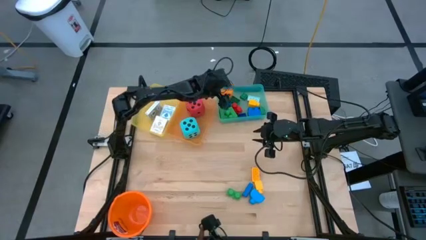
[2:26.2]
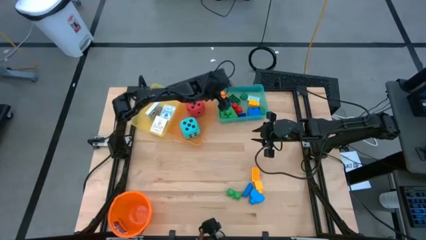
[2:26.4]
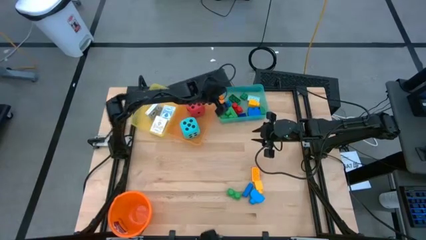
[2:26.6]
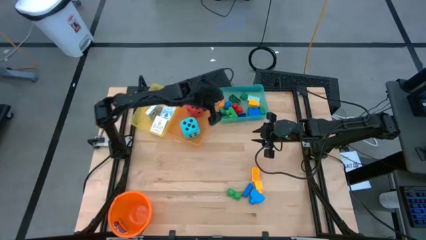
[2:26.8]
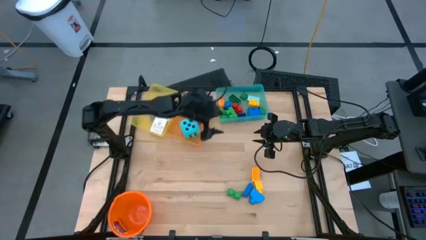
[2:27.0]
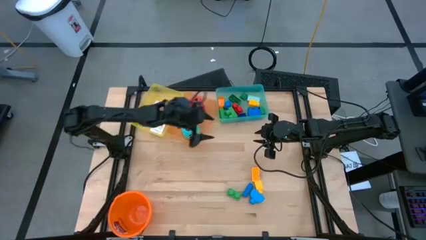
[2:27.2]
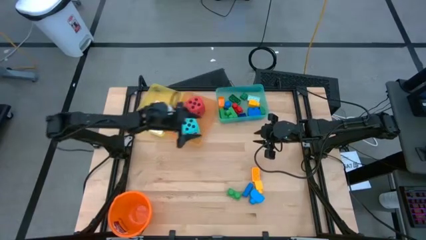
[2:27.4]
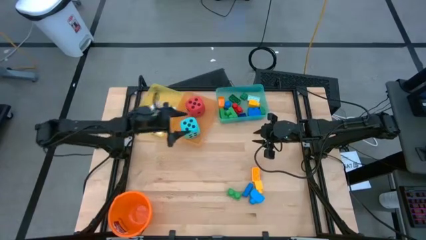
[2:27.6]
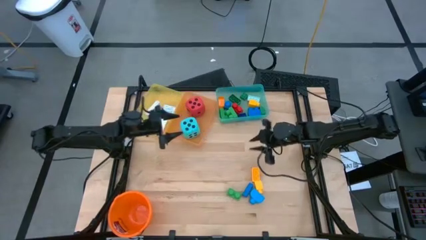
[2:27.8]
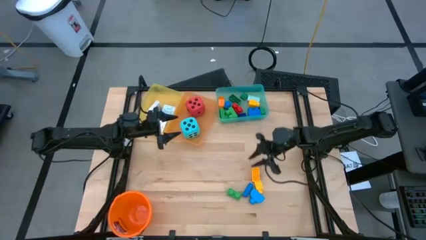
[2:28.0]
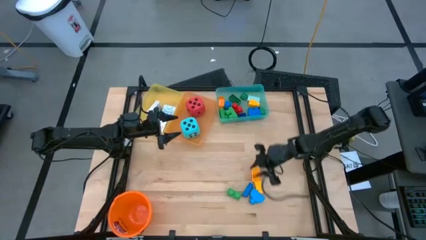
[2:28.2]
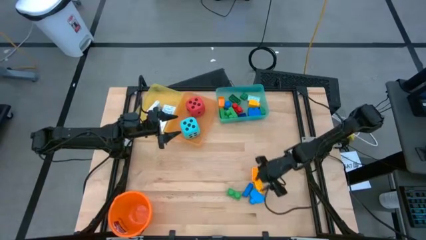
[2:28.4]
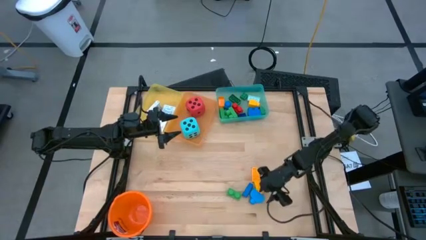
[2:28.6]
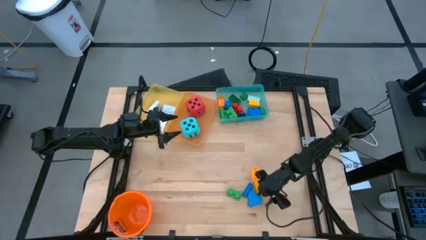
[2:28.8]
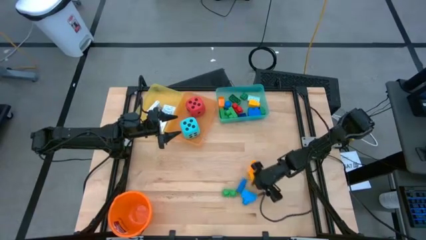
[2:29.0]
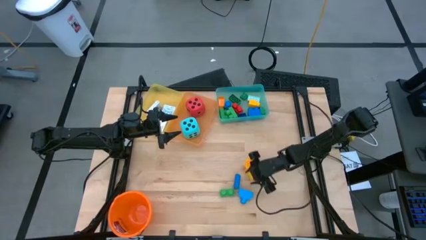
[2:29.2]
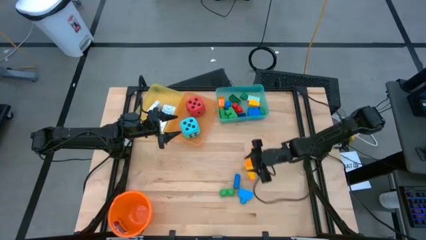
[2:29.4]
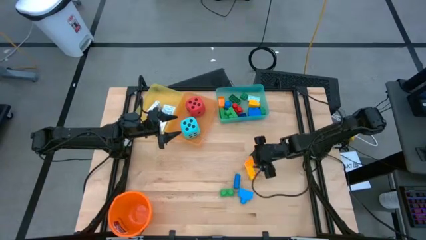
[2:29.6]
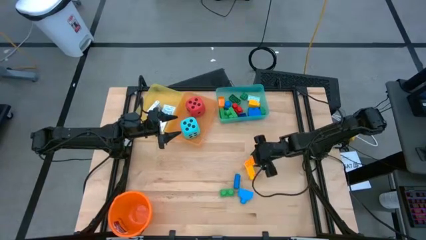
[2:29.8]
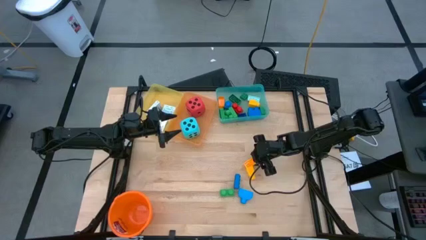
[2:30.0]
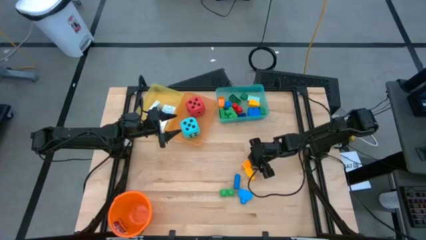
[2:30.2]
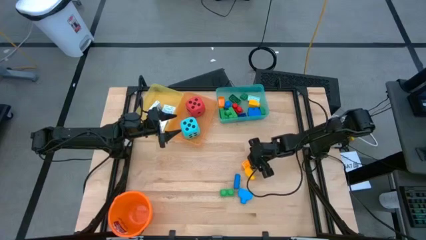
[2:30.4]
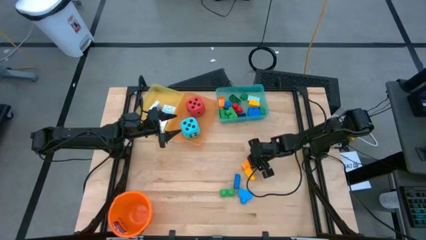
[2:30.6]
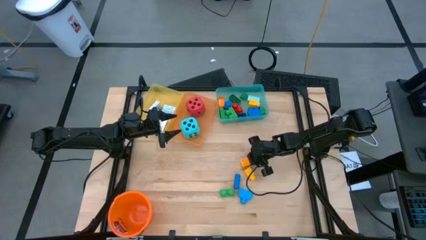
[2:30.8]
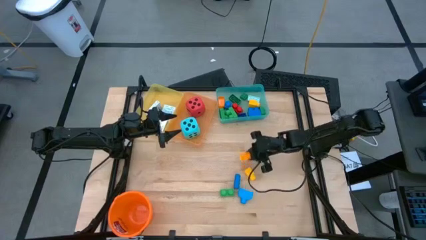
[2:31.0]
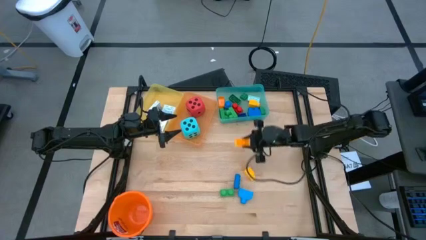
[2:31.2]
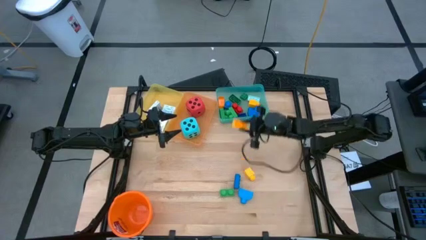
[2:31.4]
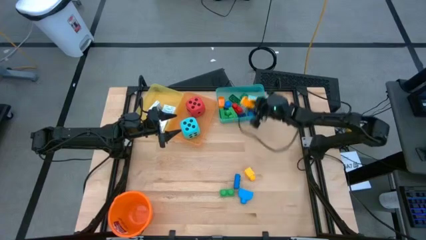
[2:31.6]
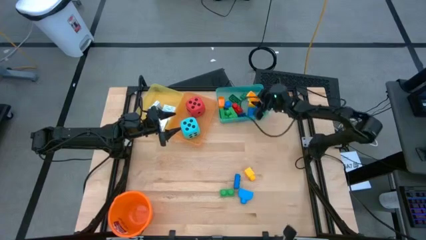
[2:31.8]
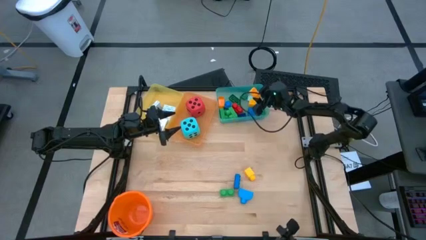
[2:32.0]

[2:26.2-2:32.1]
Task: Pick & Place Toys
Put the yellow game piece into the blue bin

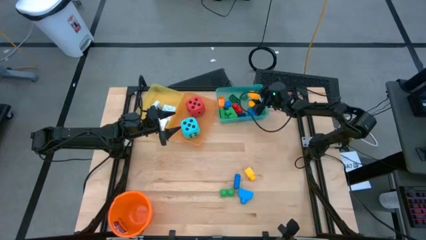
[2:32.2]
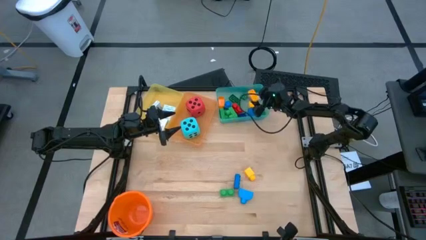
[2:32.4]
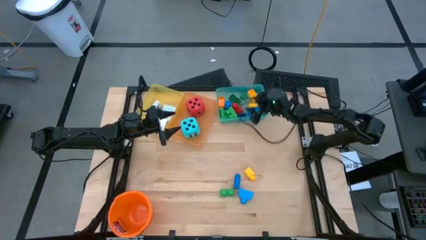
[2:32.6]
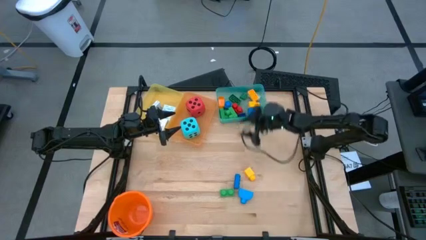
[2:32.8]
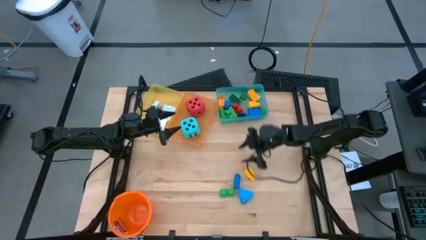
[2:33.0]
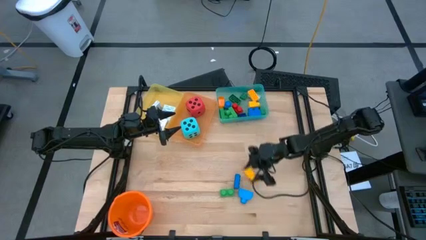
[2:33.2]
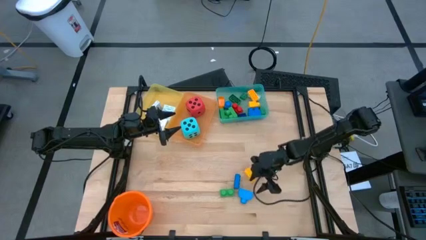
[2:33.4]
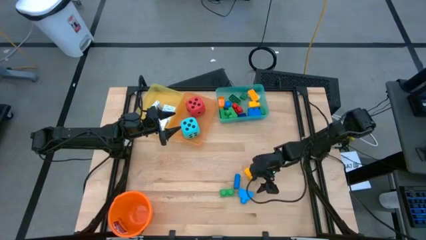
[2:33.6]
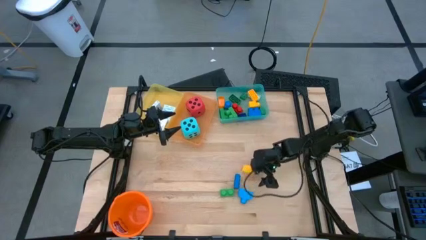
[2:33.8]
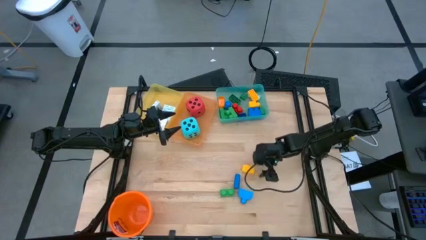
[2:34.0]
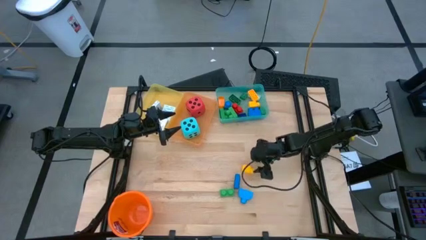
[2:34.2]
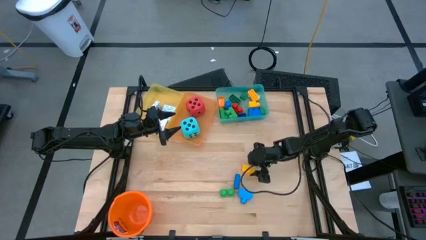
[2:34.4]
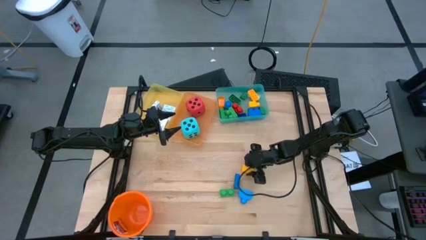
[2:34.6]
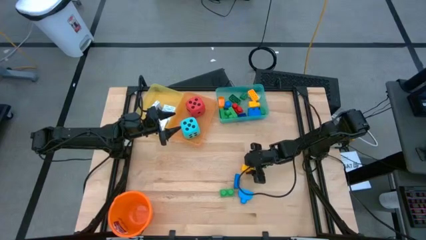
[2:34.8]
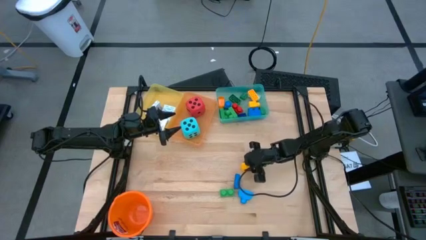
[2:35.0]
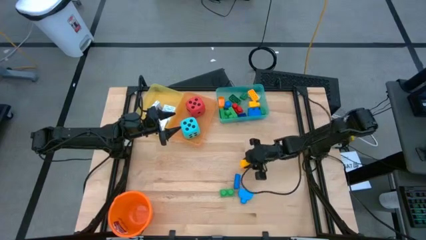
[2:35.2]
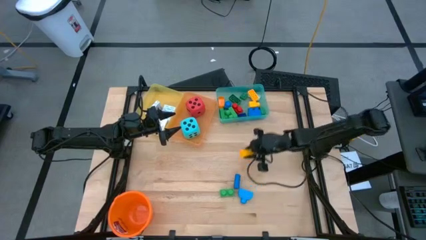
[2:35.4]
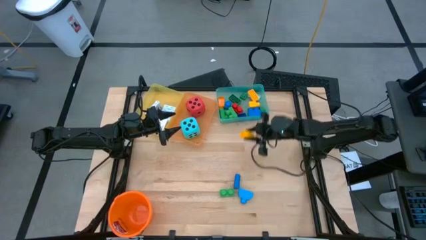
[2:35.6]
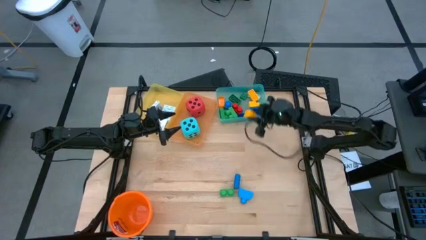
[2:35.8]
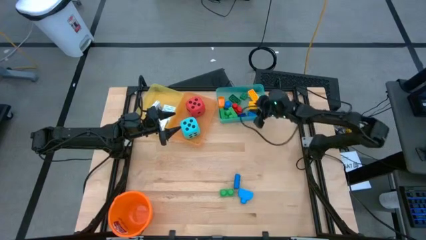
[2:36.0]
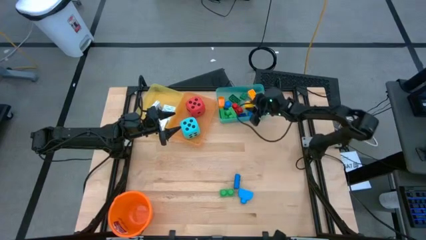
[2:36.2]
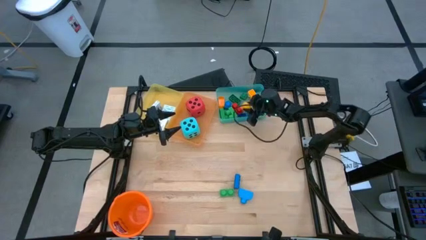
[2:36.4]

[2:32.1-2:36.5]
Put the yellow game piece into the blue bin

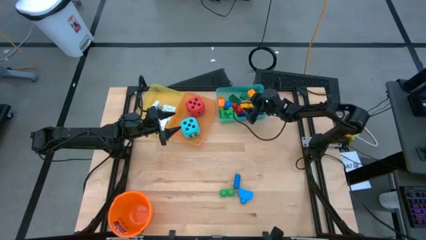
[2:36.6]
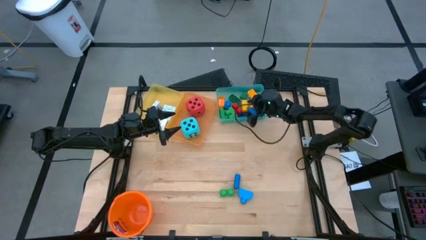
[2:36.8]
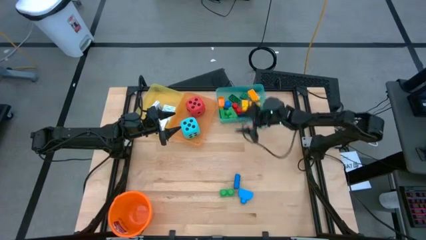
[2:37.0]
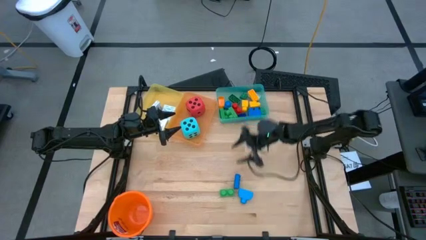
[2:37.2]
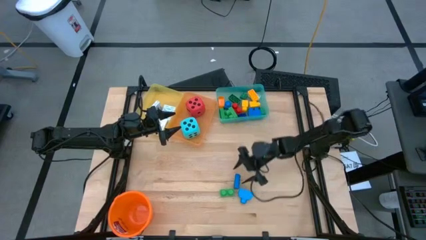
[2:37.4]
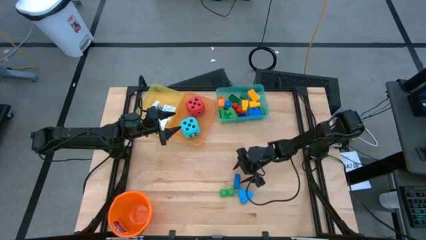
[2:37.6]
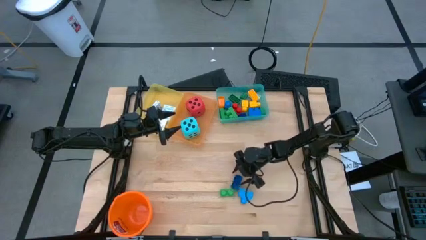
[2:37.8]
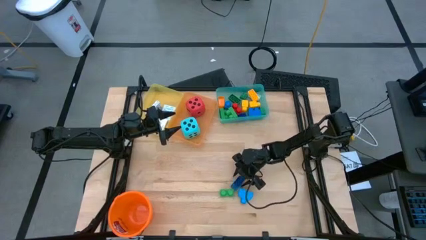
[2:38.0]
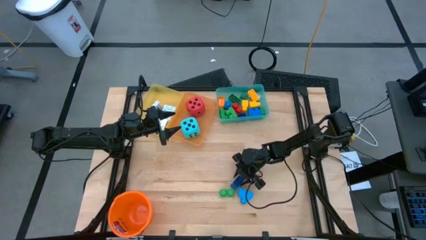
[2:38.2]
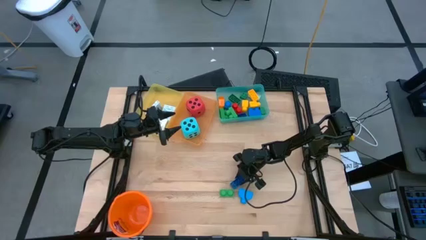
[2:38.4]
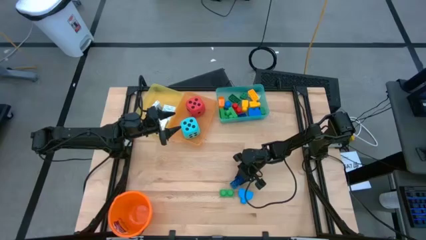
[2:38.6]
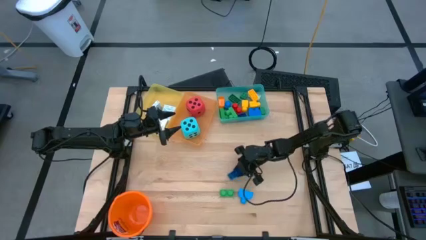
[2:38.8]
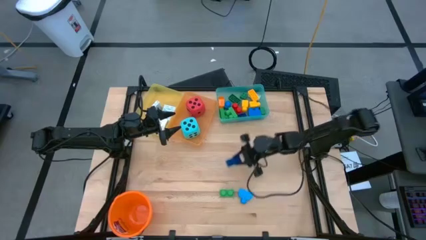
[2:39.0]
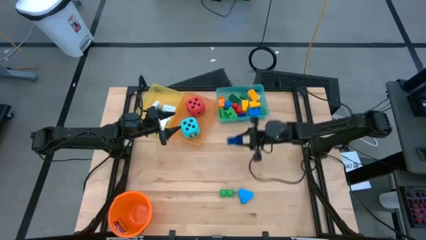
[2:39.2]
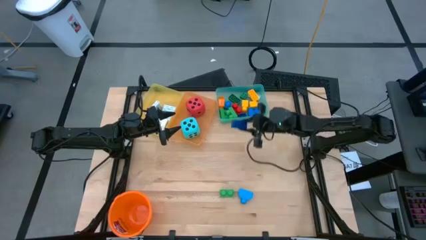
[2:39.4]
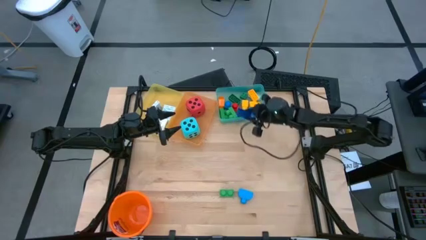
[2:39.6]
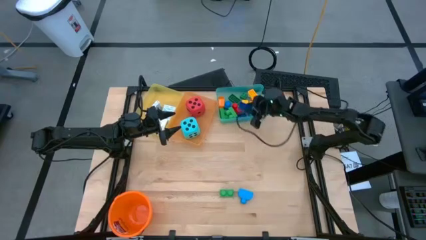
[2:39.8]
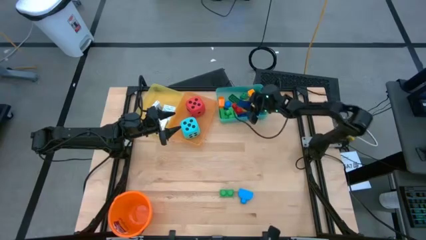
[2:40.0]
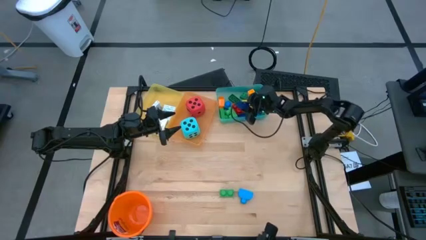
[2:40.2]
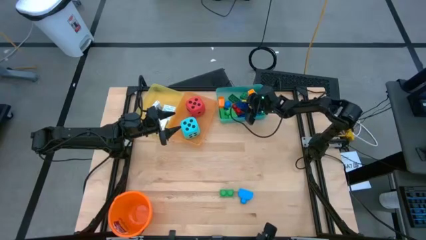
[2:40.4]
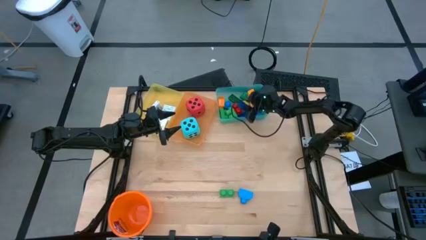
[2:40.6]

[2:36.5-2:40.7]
Put the blue game piece into the blue bin

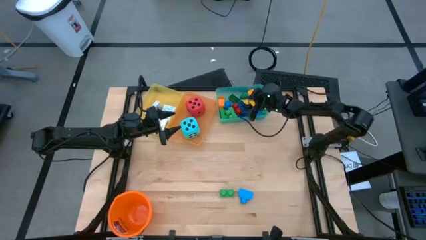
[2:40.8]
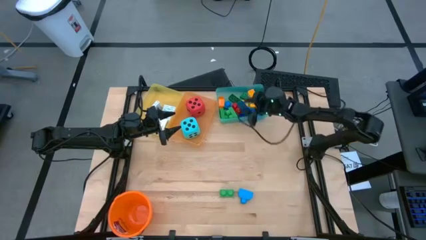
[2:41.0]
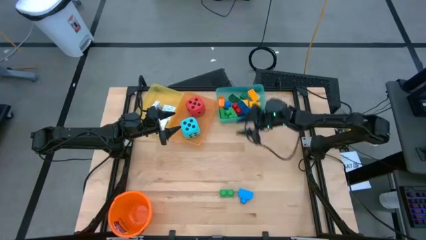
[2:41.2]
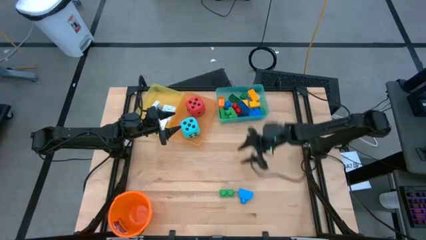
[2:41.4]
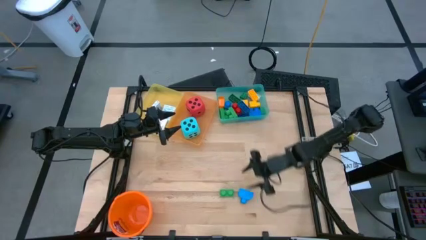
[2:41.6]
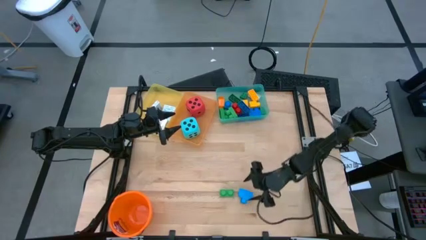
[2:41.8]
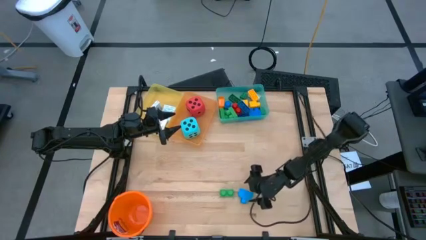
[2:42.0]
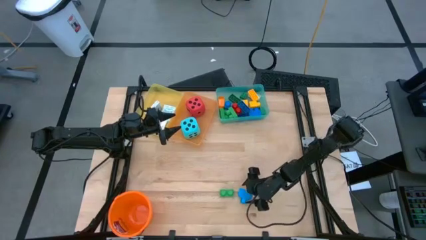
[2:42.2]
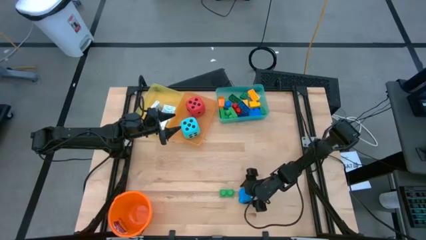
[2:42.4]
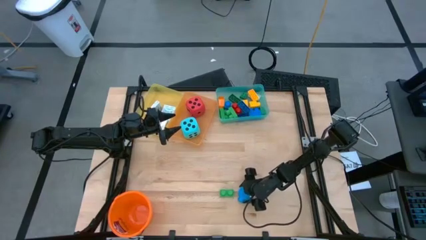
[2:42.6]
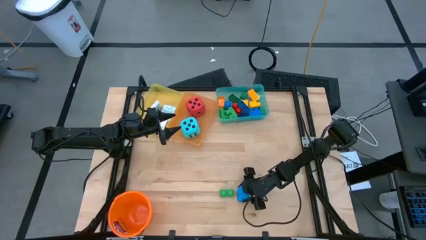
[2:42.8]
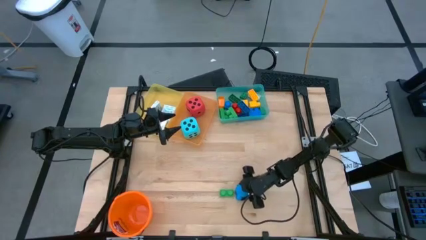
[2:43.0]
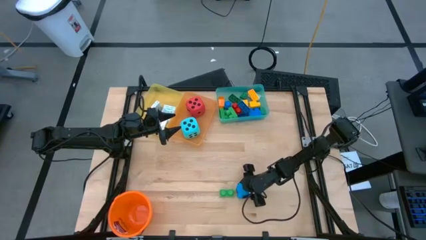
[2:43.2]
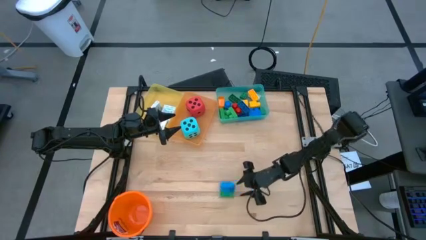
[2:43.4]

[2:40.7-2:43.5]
Put the blue game piece into the blue bin
